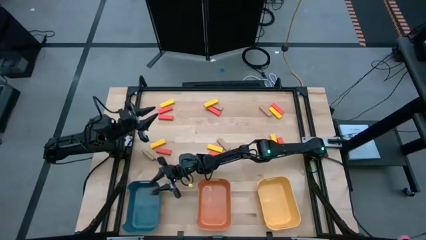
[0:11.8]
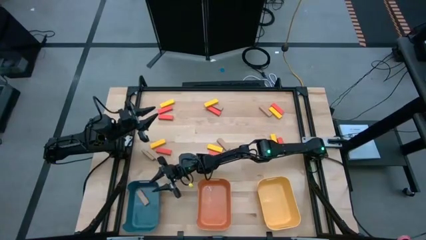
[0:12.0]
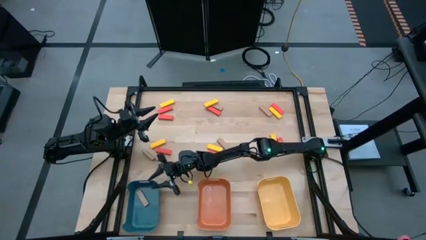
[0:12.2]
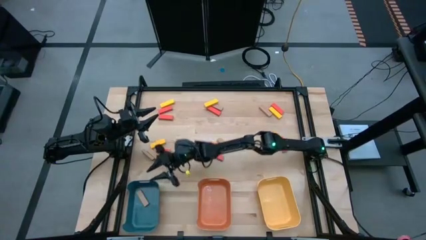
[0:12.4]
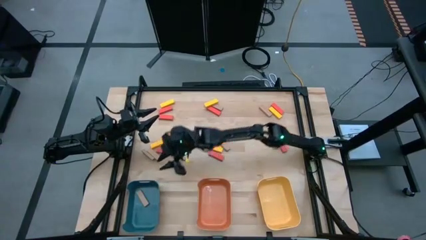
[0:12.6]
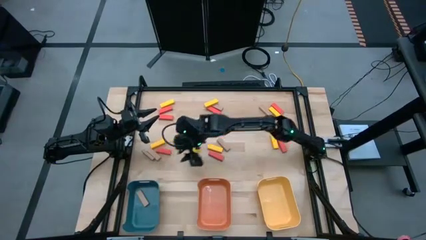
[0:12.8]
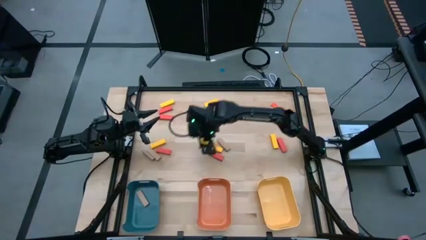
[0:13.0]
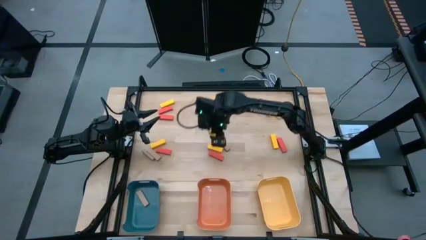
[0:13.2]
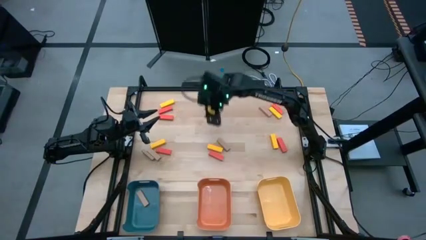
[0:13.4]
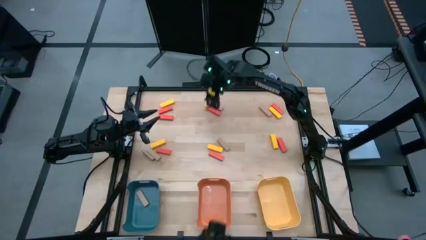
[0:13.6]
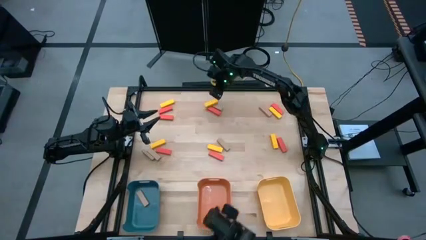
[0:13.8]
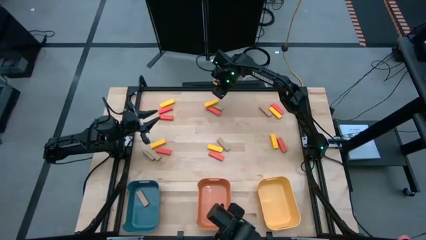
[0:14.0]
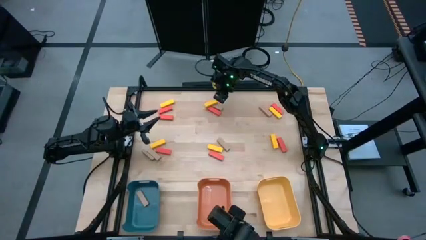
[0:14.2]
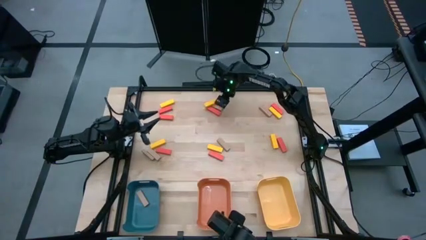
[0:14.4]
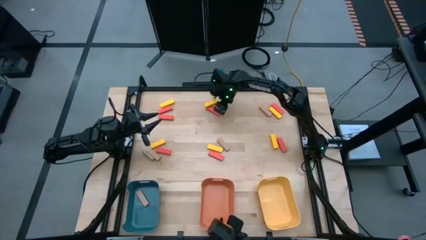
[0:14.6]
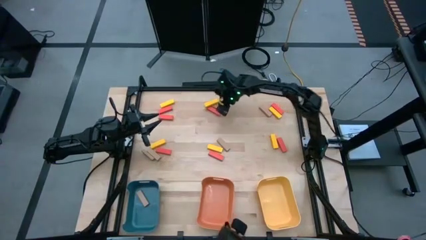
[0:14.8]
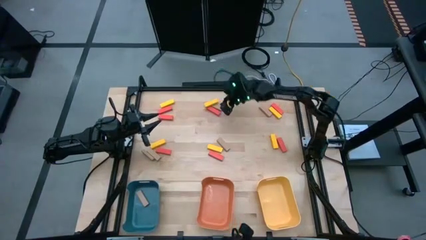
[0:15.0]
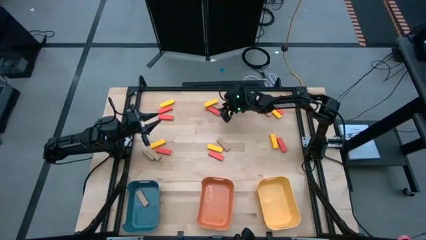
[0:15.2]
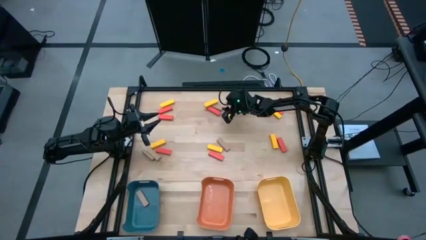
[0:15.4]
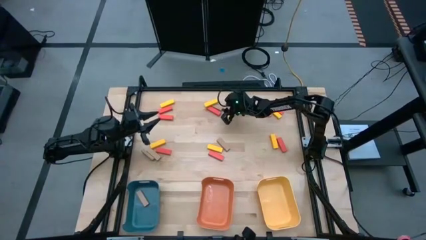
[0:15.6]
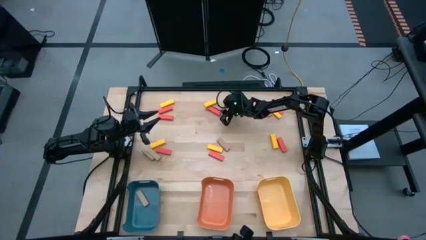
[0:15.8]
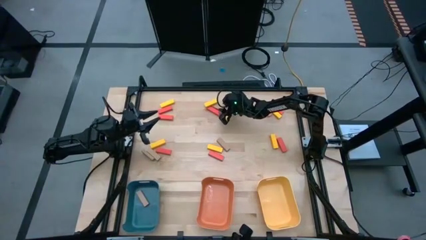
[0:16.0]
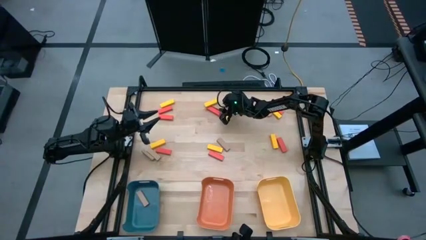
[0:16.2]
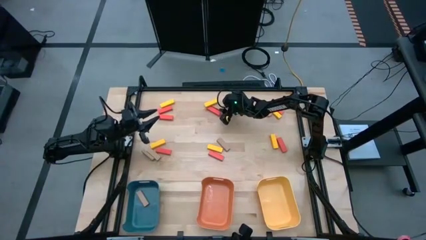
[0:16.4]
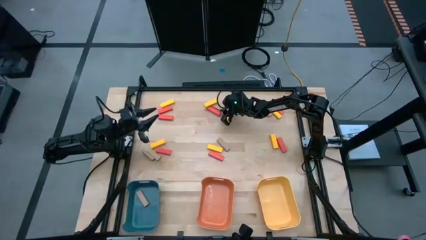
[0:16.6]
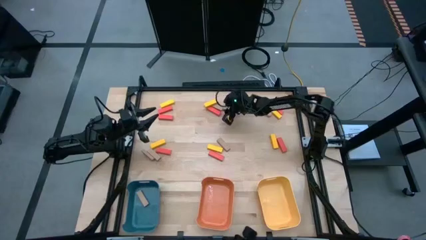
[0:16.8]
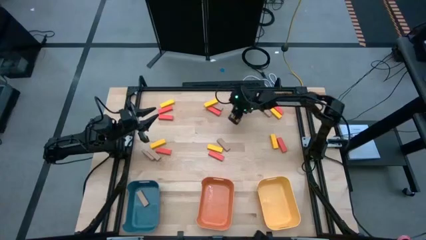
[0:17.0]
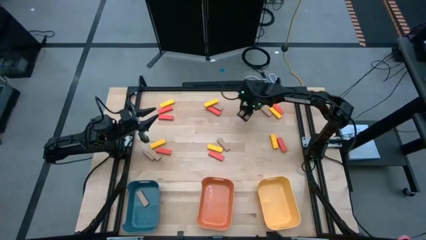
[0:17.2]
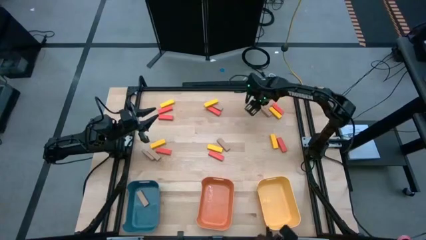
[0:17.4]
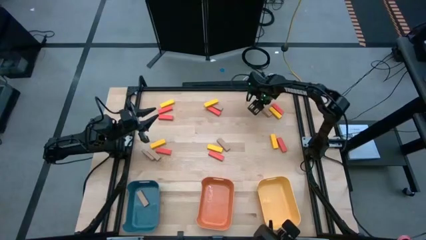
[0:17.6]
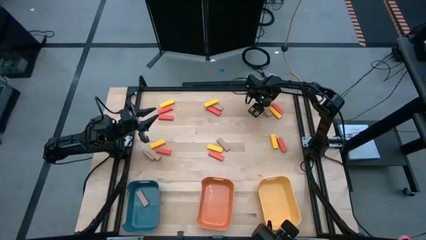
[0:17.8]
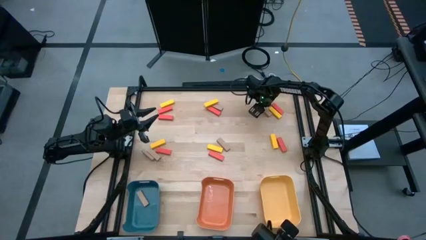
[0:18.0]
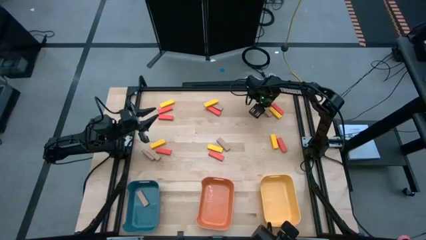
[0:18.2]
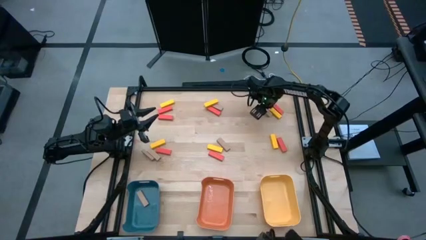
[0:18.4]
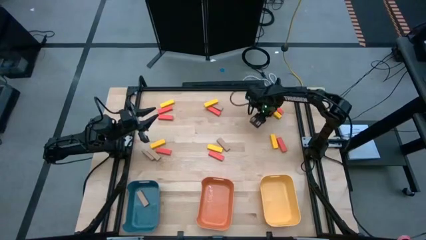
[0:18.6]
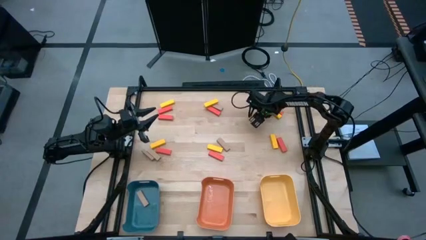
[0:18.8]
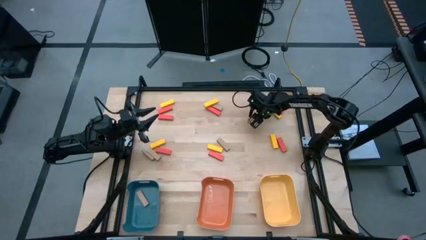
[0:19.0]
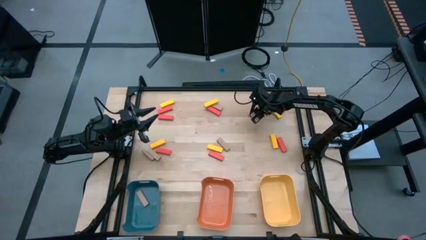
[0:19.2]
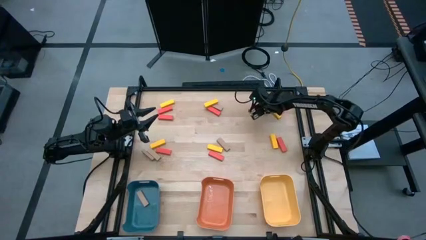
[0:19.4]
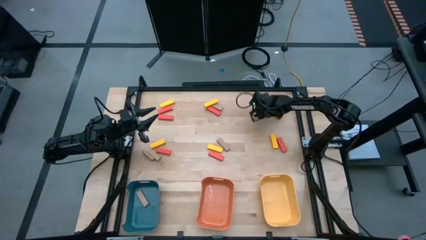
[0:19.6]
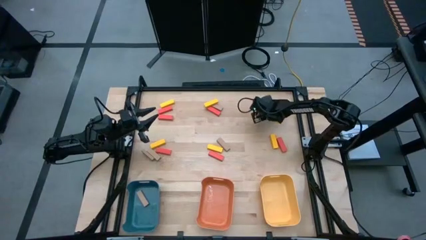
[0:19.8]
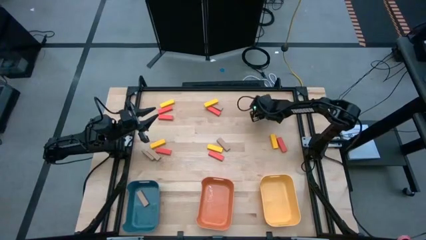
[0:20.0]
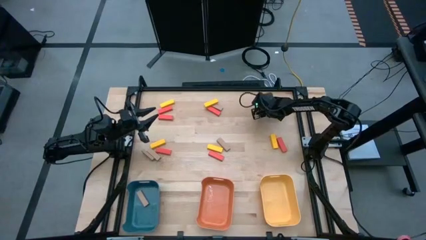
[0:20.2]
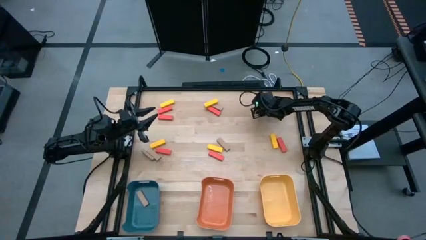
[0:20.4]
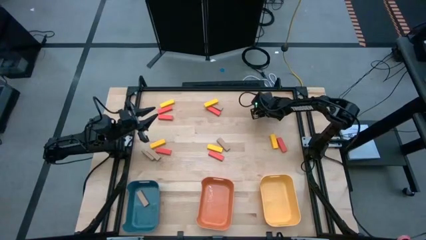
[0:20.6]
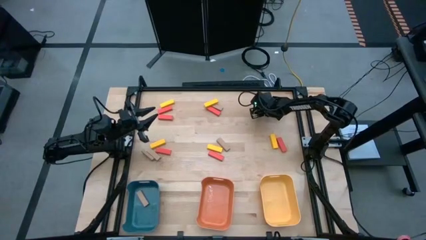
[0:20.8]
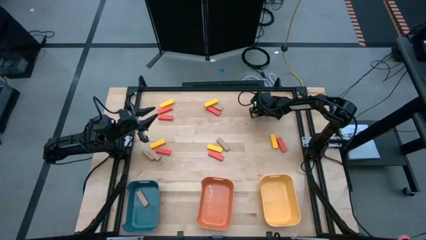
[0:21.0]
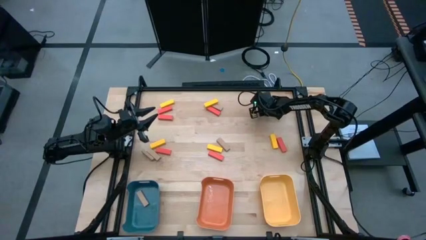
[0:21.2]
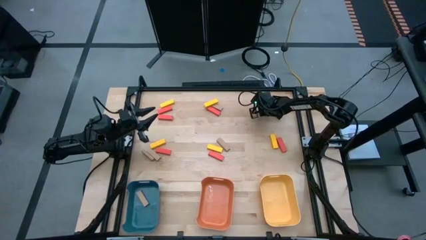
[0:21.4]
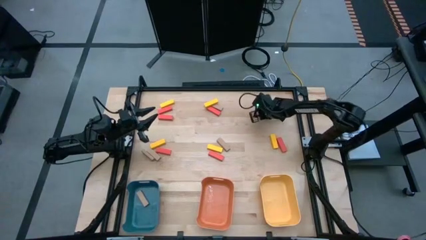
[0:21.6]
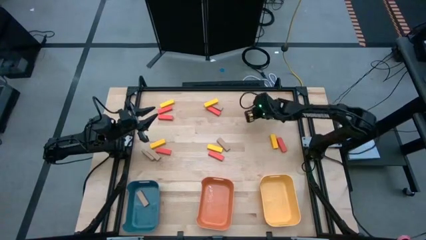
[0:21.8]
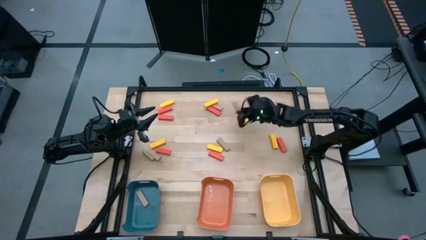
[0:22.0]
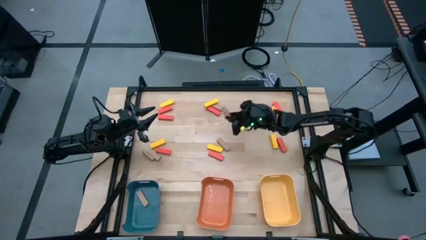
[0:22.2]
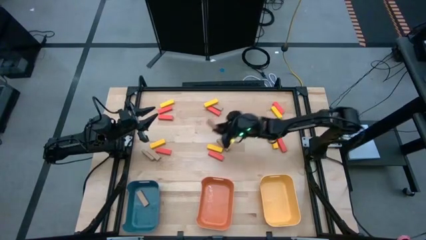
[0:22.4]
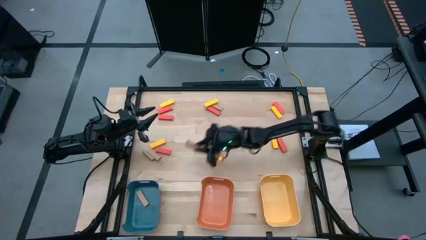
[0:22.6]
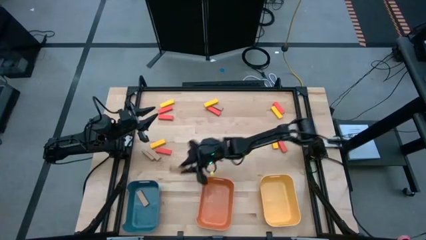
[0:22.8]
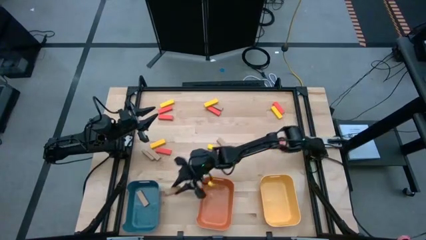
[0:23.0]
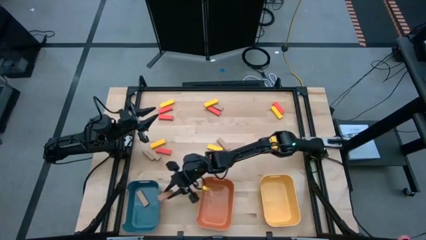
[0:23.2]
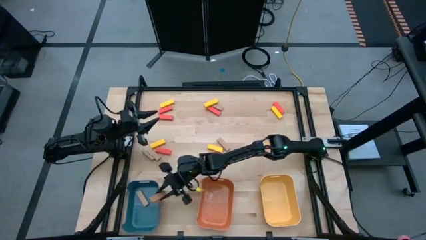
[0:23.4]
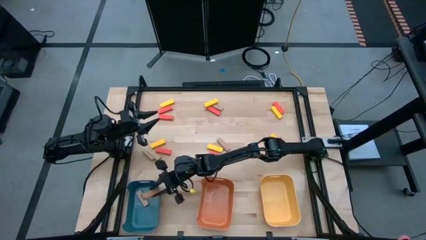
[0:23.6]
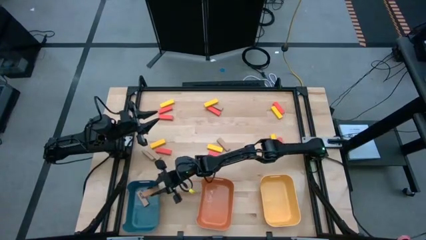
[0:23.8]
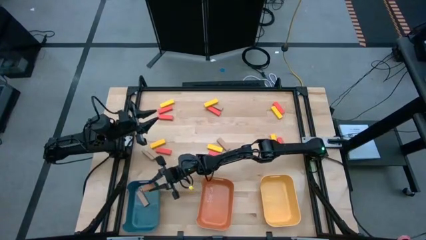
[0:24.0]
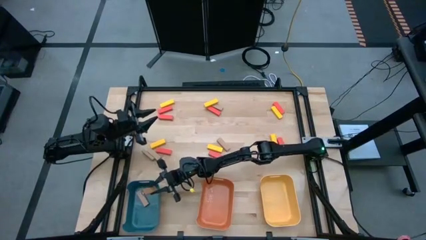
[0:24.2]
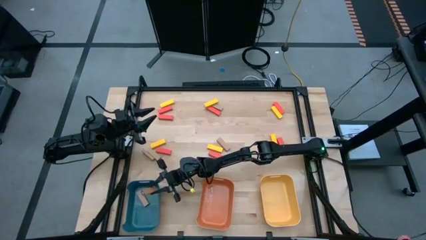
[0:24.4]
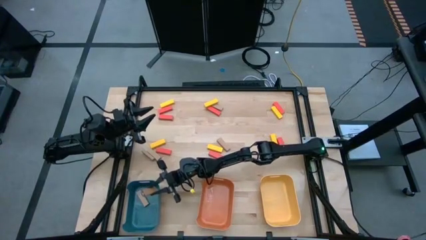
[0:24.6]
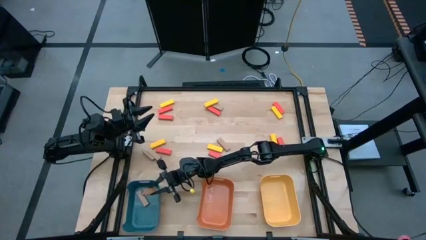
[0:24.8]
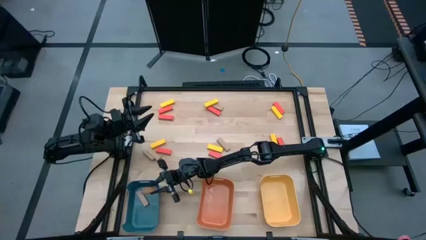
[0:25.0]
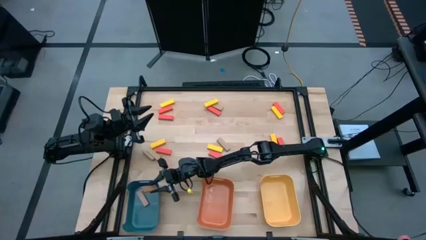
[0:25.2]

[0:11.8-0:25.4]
Task: Sort blocks
Put the top right brown block into the blue bin
